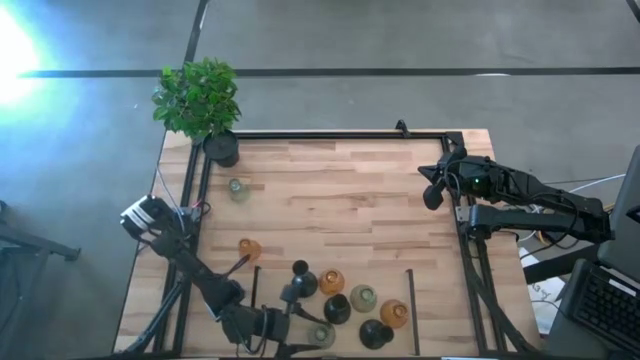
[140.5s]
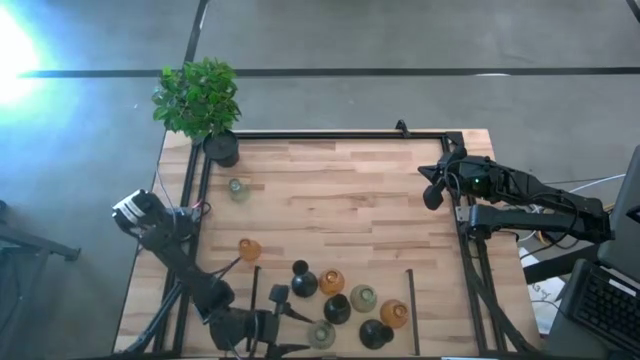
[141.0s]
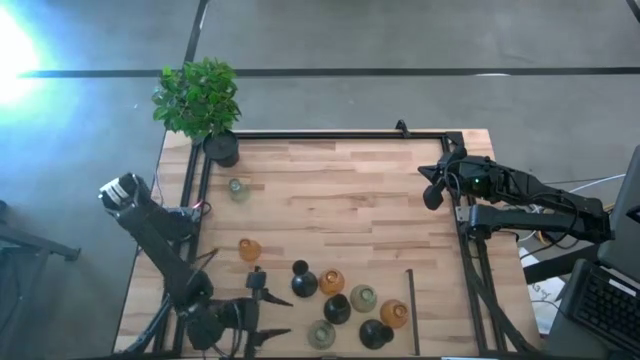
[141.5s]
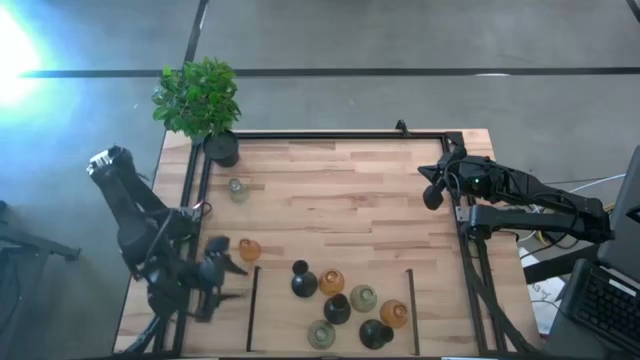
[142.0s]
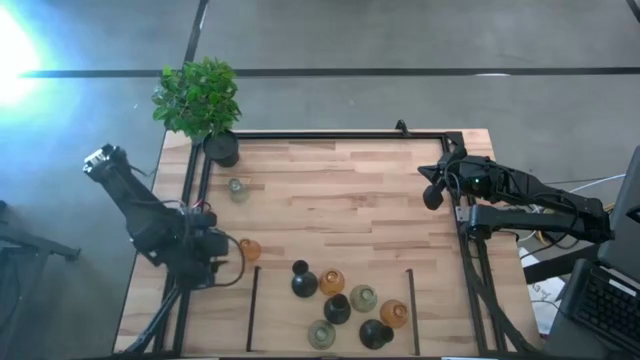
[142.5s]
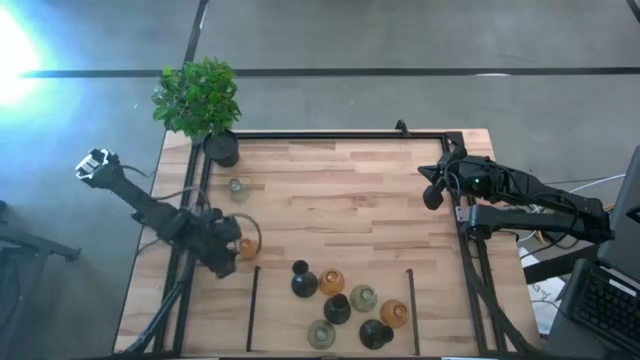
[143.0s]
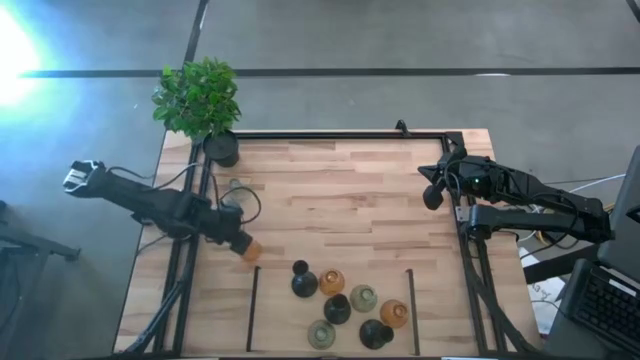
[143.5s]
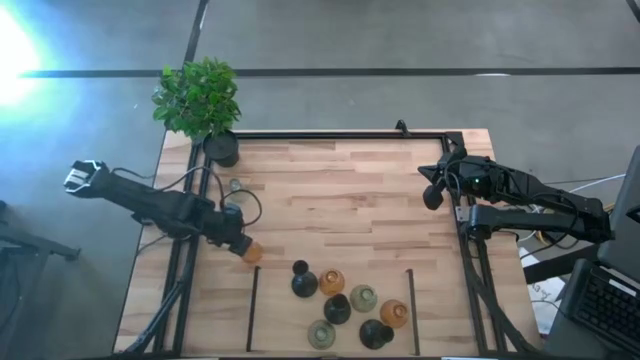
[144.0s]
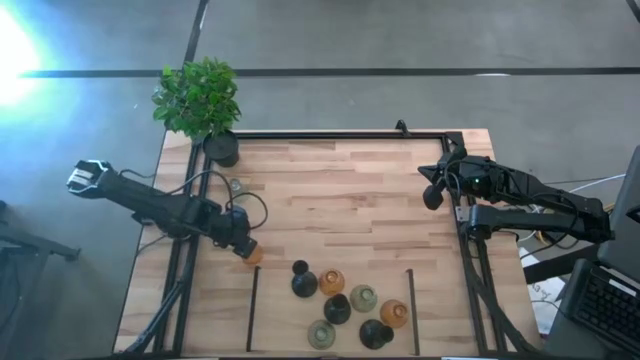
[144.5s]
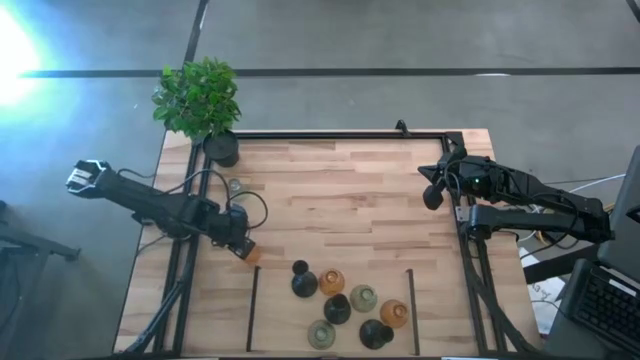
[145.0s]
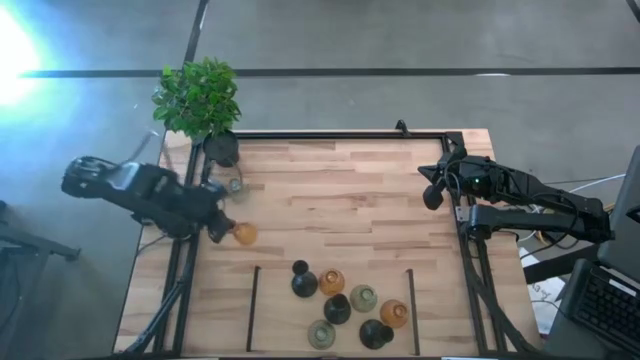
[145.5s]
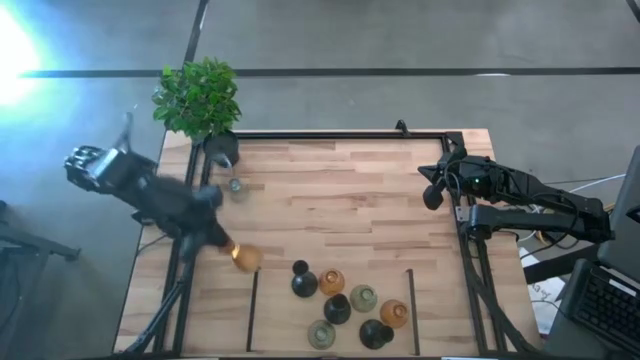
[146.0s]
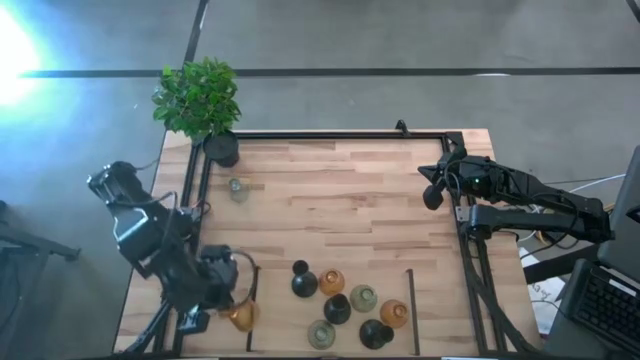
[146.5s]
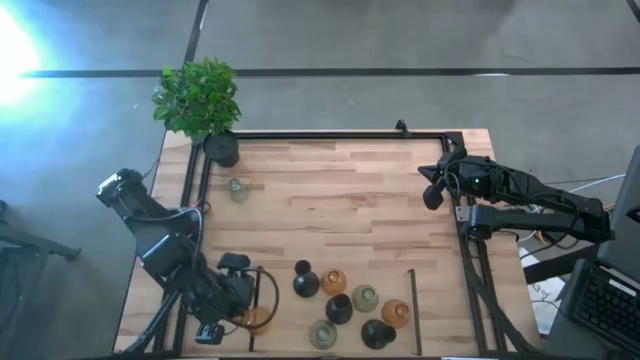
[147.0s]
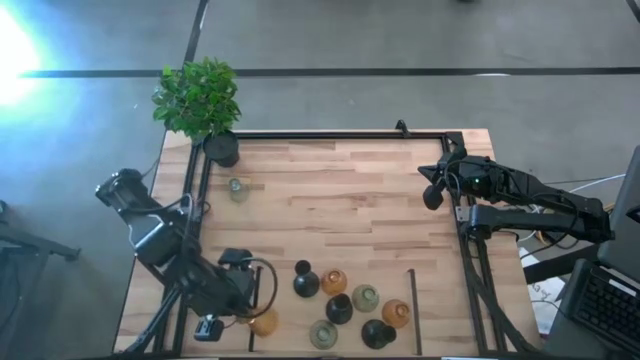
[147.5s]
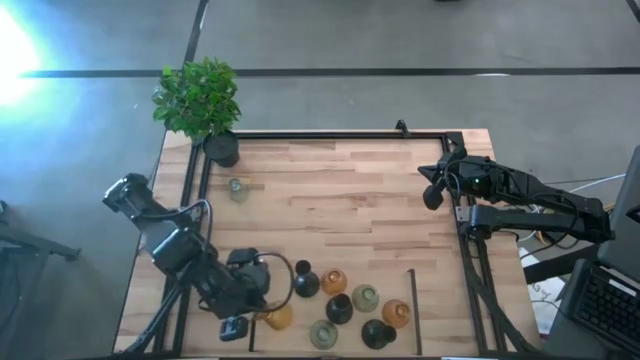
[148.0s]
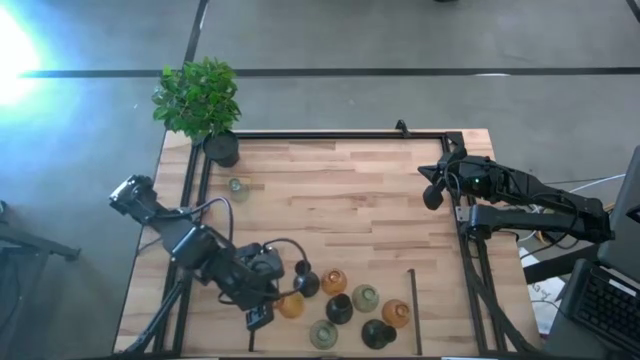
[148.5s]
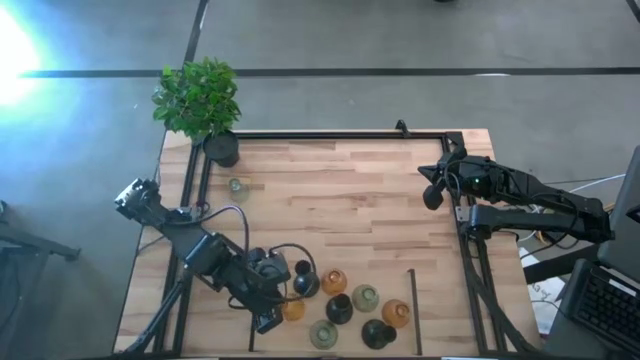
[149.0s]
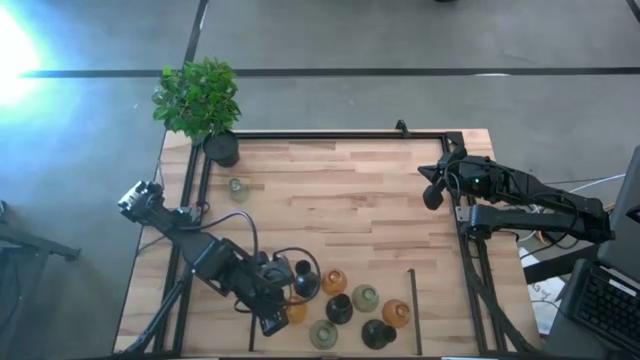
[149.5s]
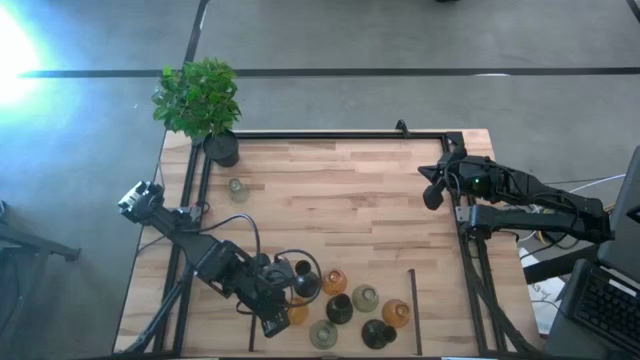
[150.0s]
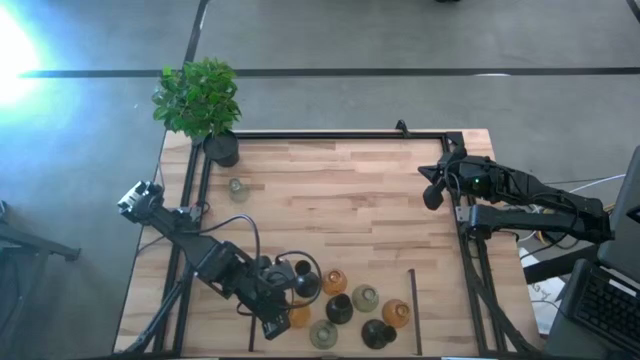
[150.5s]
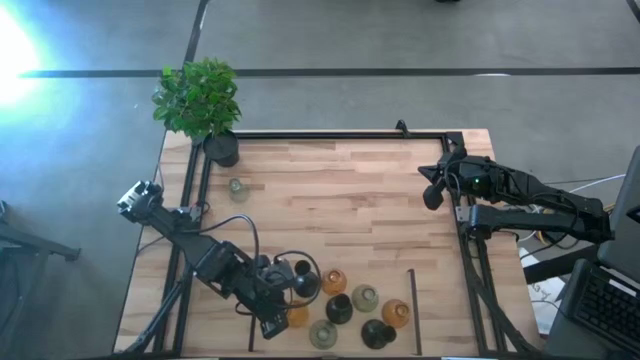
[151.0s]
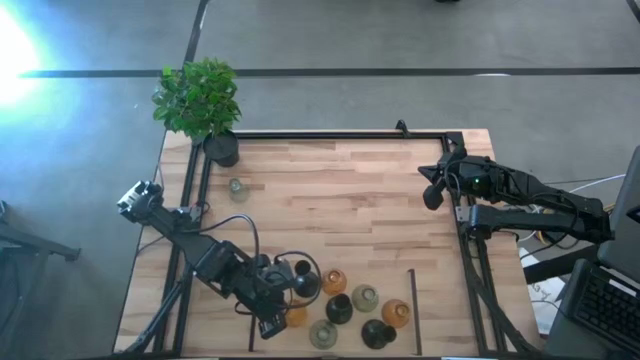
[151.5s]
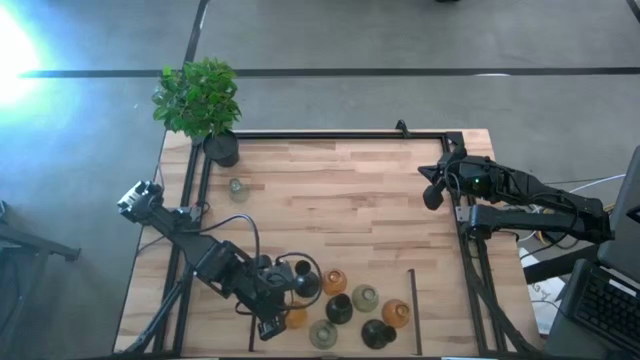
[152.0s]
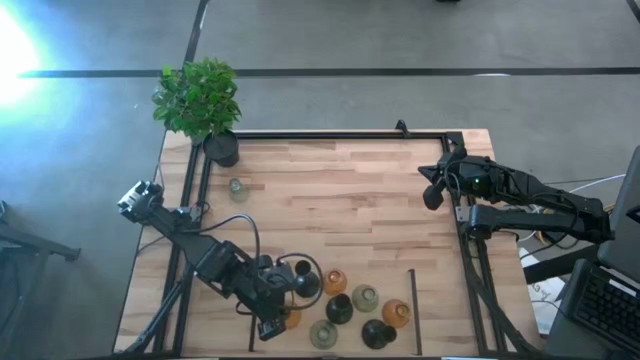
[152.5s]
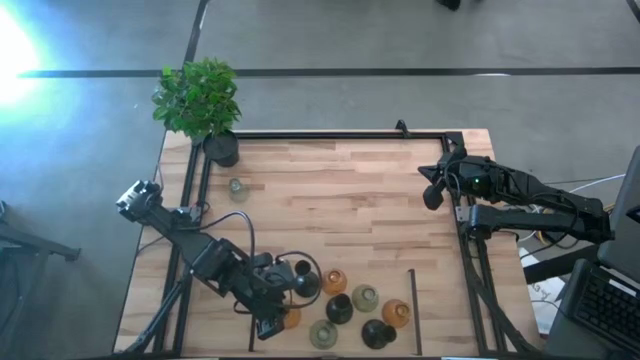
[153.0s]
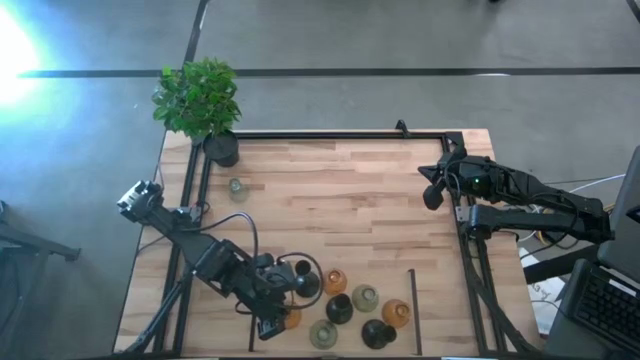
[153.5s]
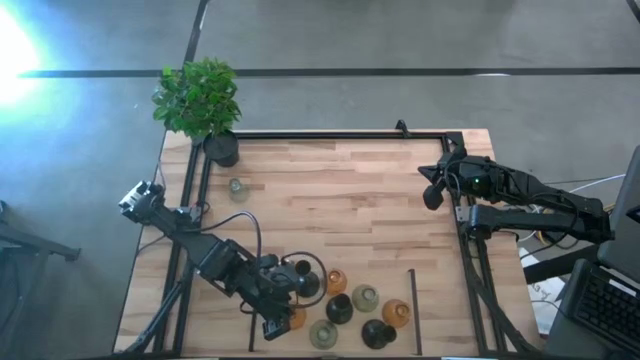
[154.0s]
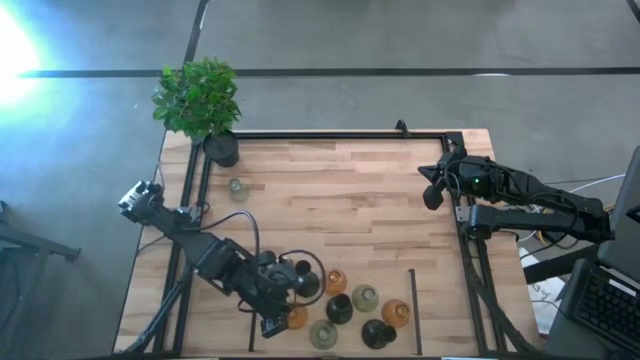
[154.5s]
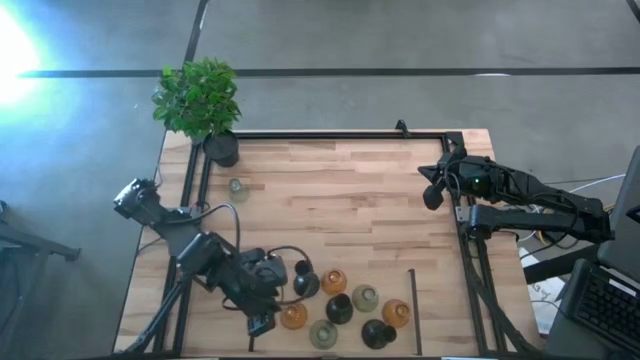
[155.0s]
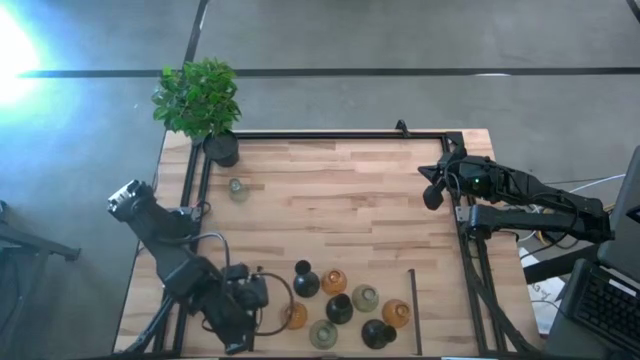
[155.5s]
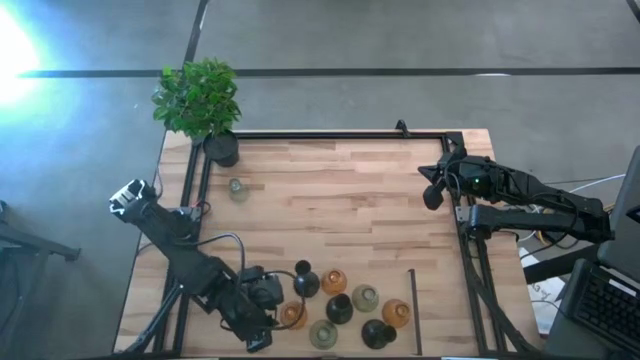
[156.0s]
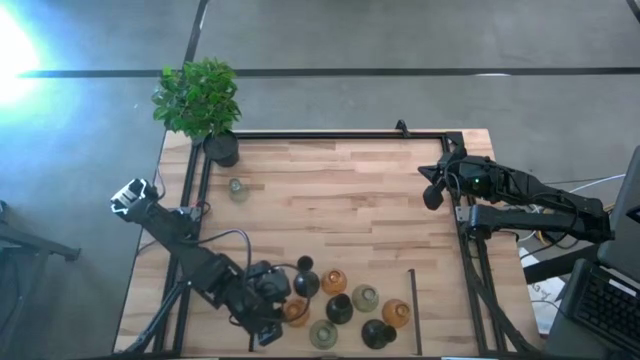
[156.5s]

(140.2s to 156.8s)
Task: Pick & Place candle stick holders
Put the orange glass candle holder on the shelf

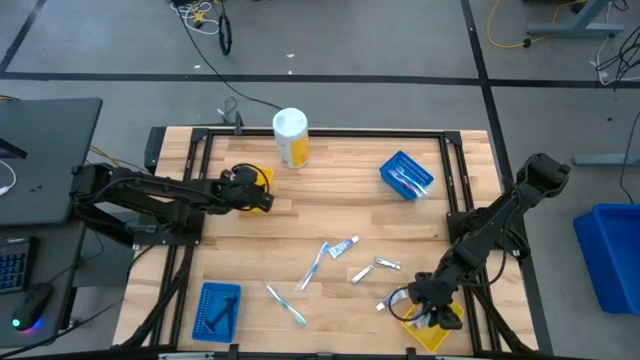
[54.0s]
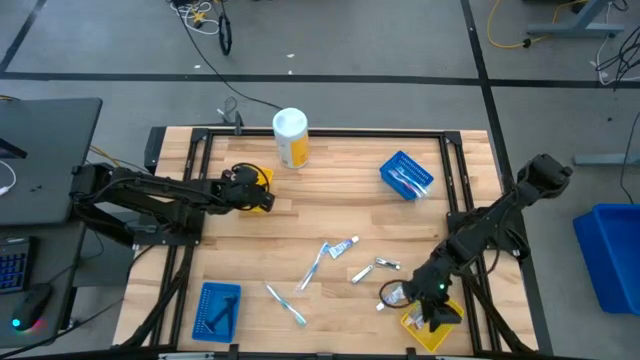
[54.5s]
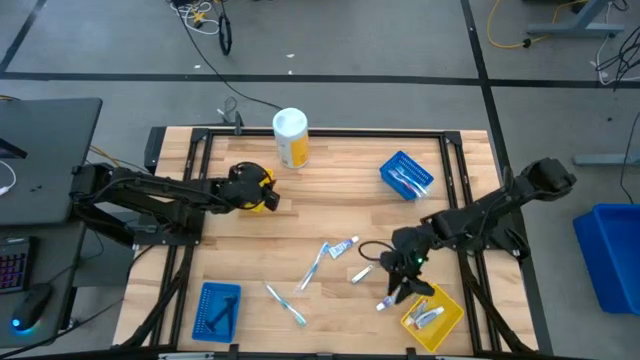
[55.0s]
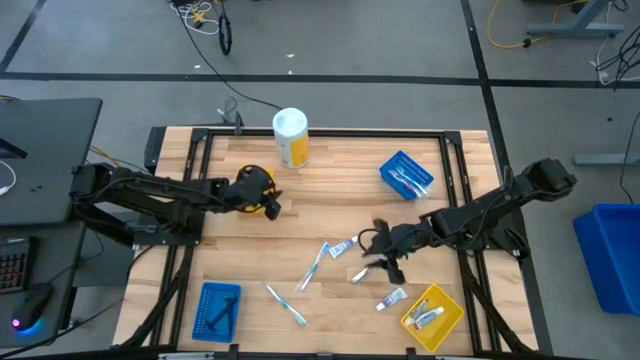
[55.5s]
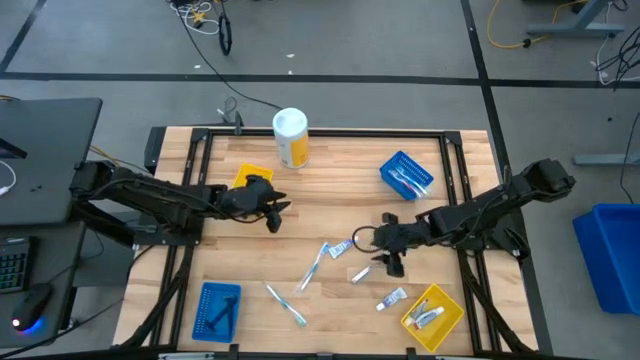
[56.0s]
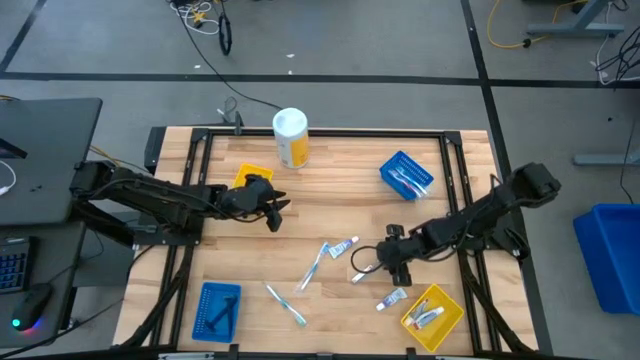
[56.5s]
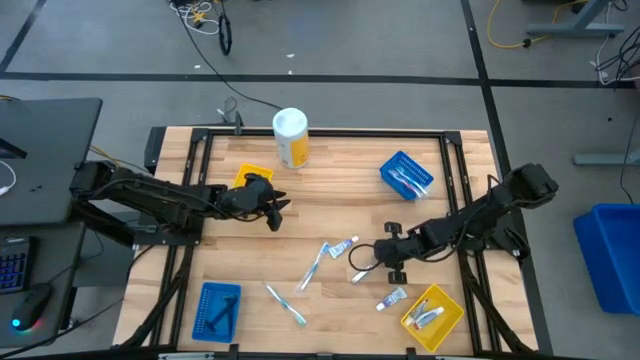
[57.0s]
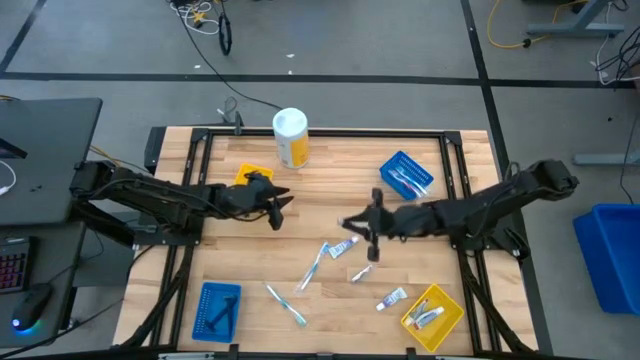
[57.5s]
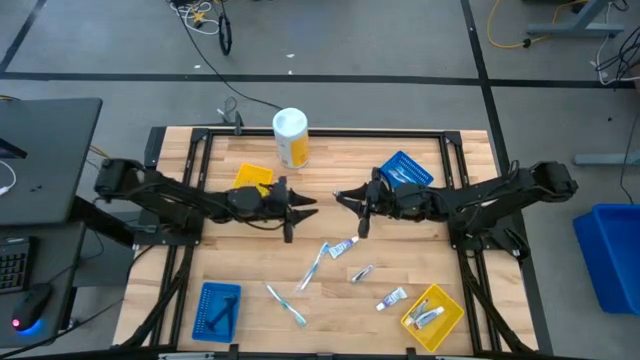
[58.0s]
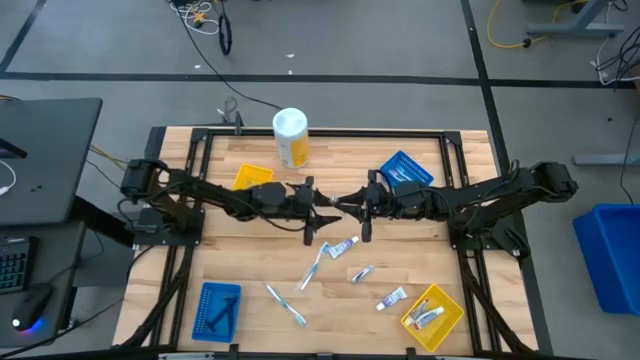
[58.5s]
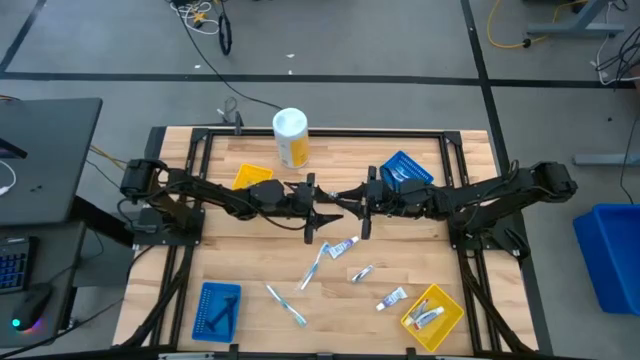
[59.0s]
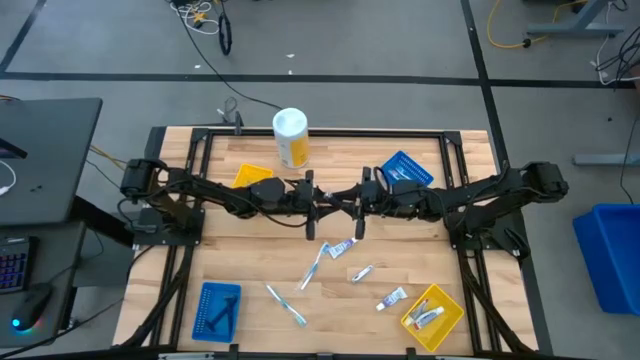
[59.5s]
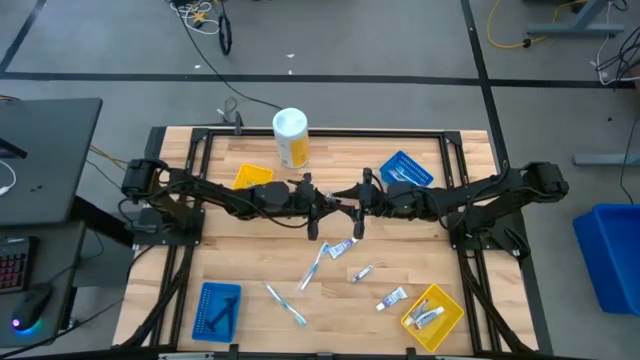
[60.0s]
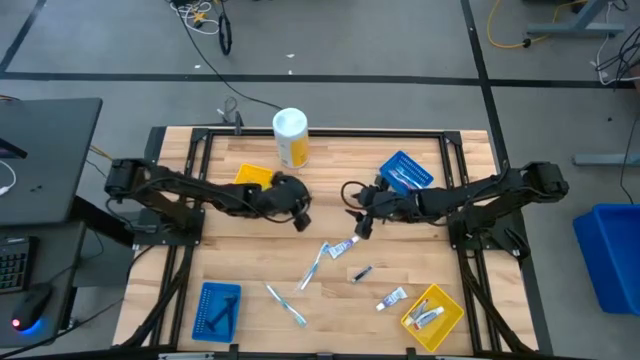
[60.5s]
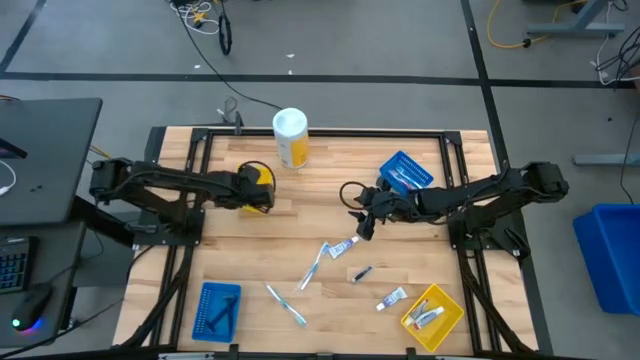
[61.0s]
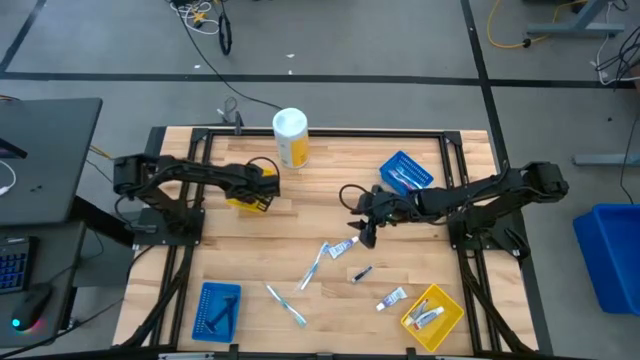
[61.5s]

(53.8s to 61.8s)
Task: Pick & Place Travel size toiletries
Put the silver nail cutter into the top yellow bin
